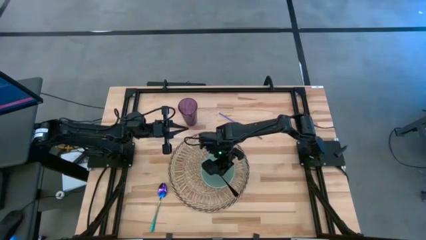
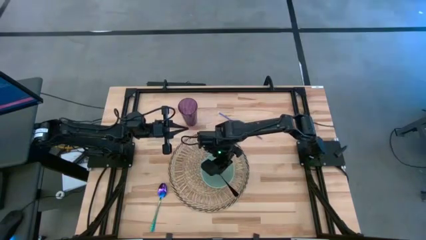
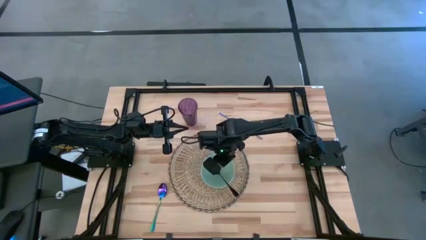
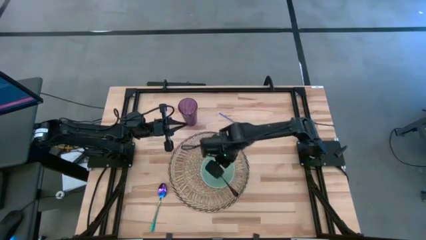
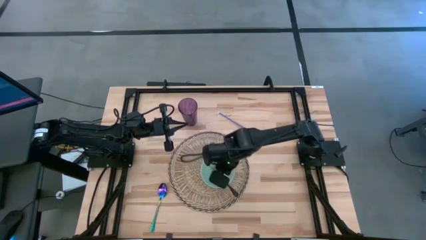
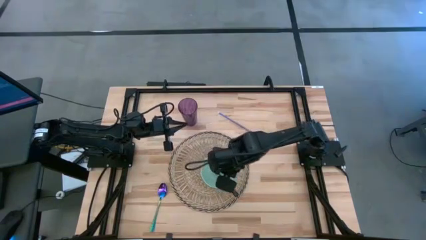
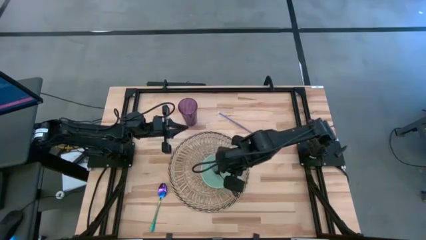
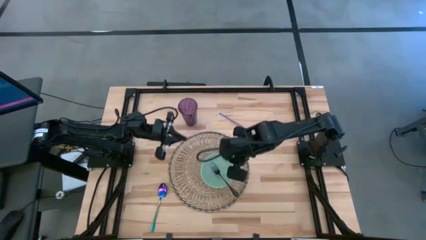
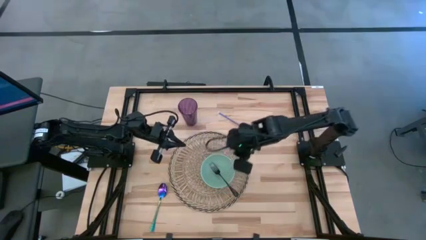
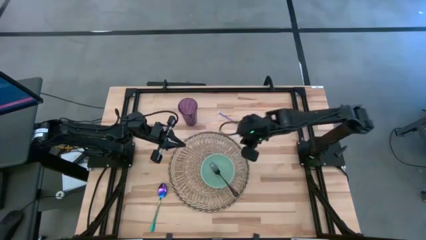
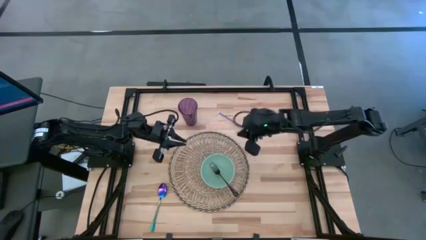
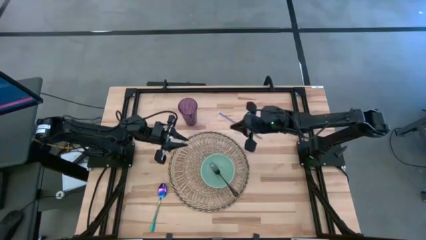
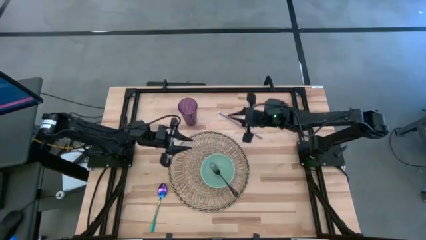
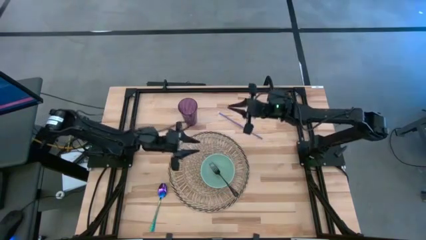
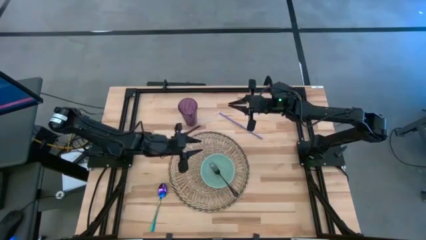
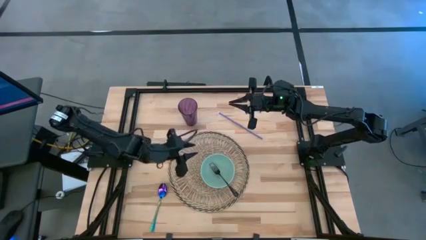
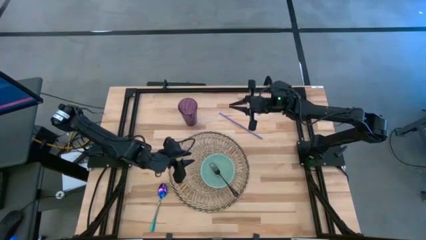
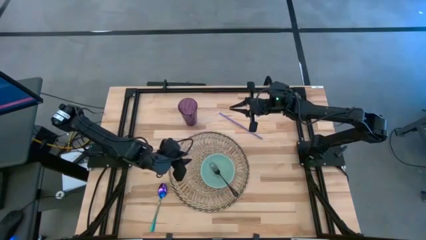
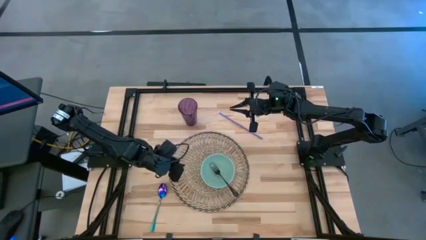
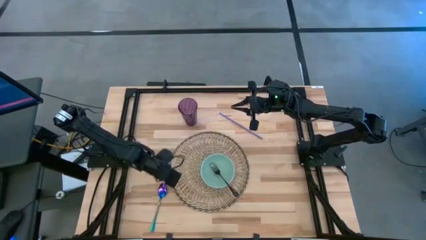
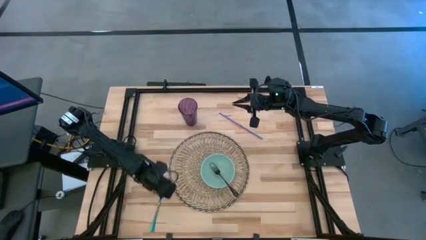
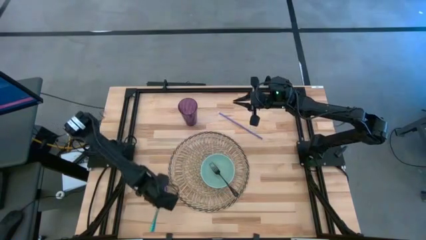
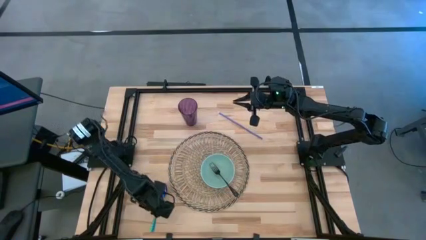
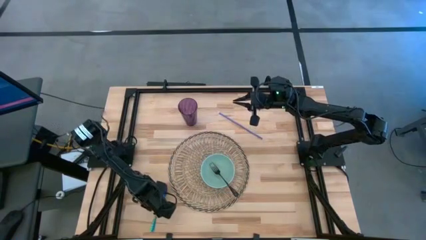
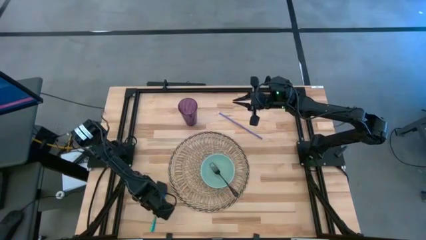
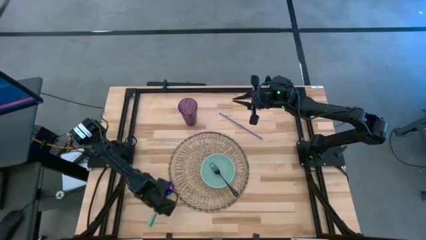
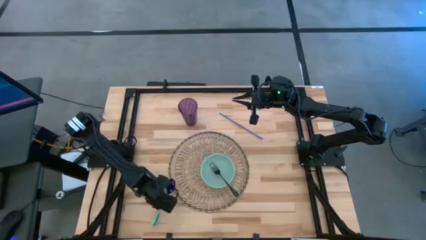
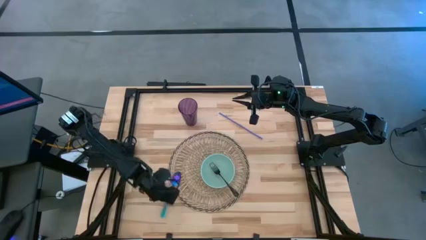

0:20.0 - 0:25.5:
Task: Pick & Place Utensil
Put the blue spoon into the light blue bowl on the table placemat

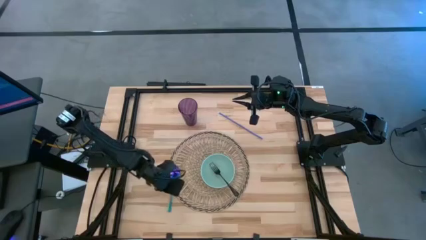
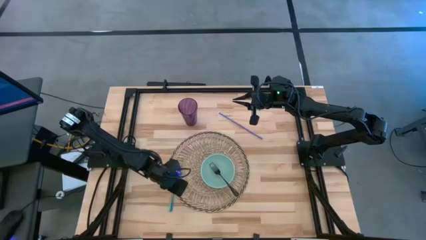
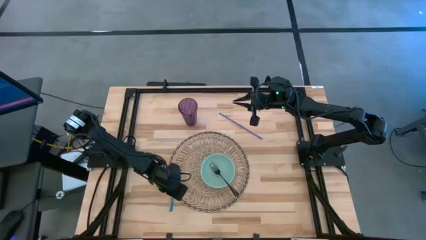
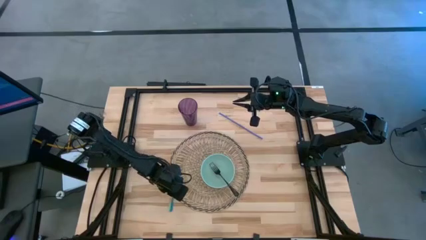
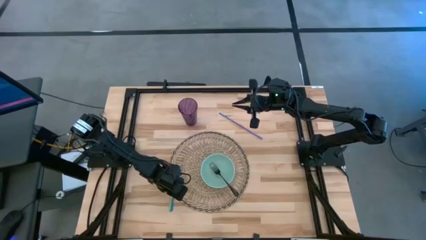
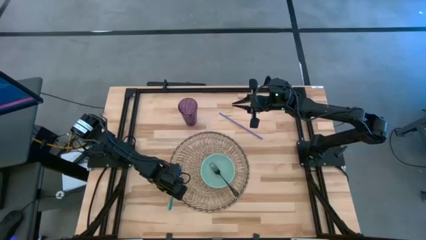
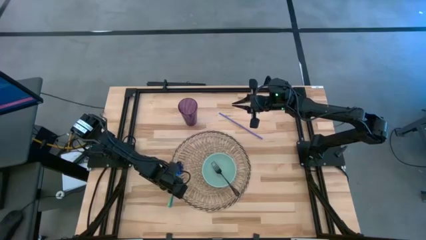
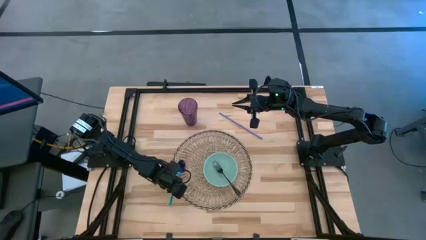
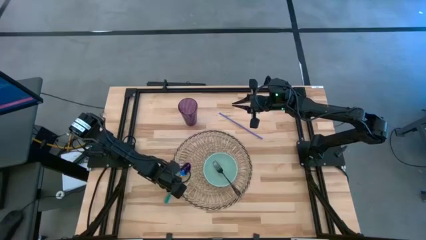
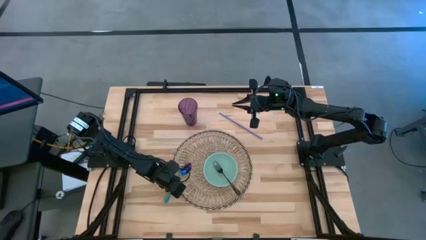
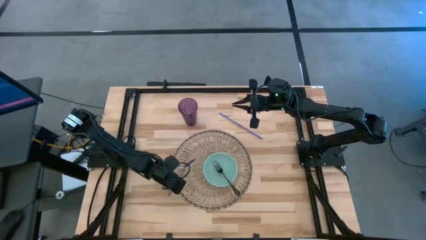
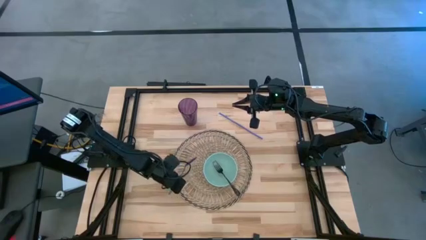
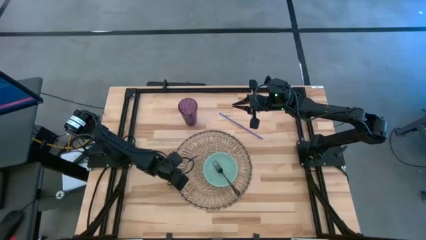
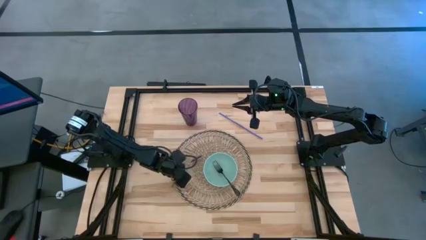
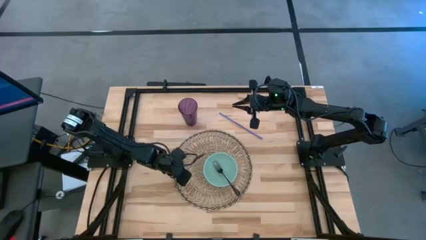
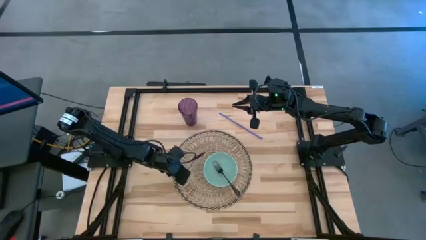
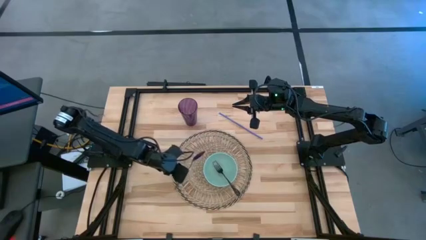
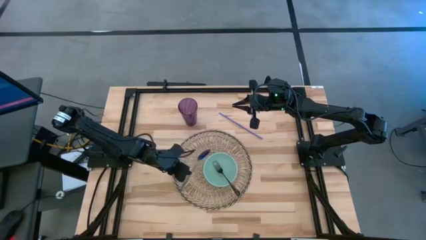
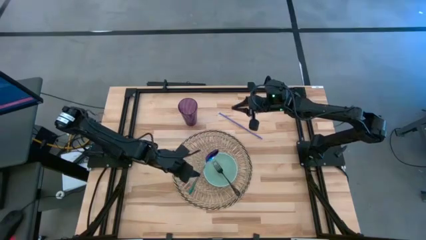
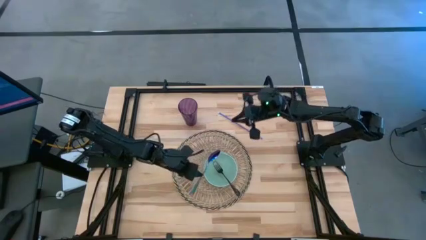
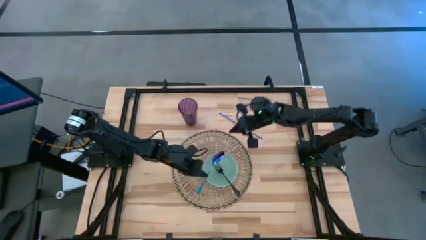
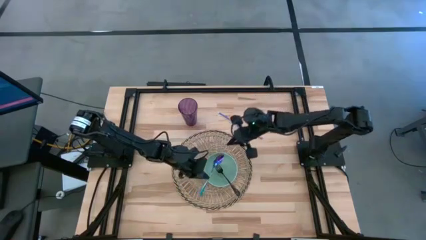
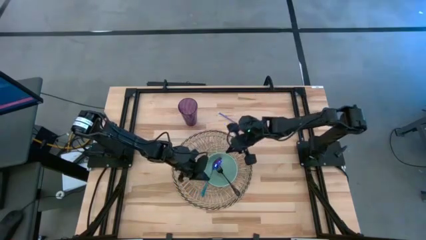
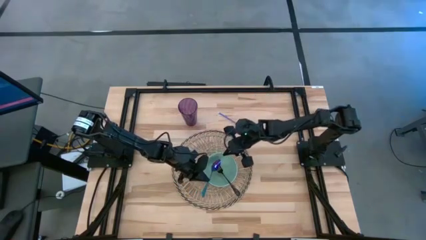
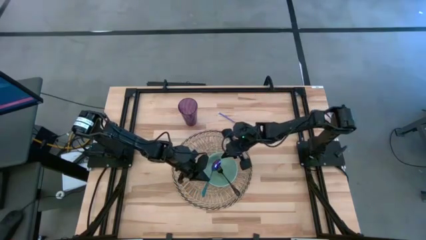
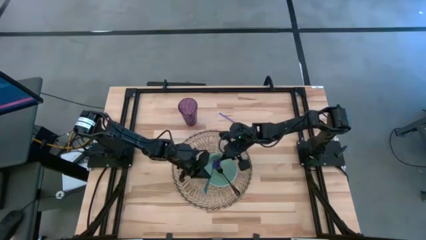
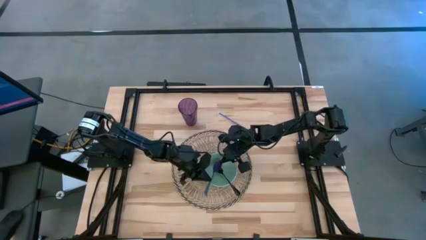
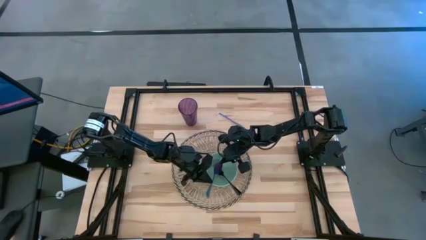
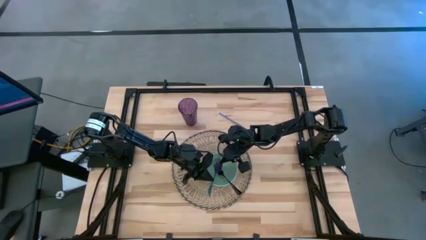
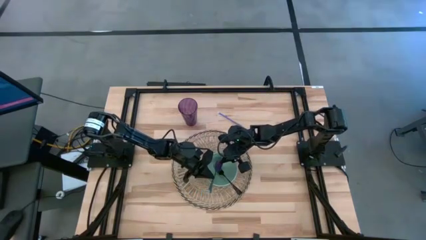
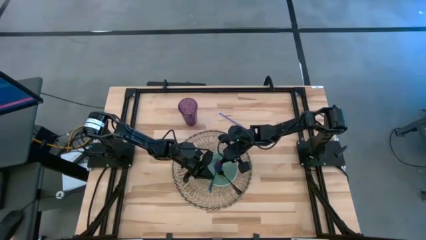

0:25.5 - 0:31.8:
Put the blue spoon into the light blue bowl on the table placemat

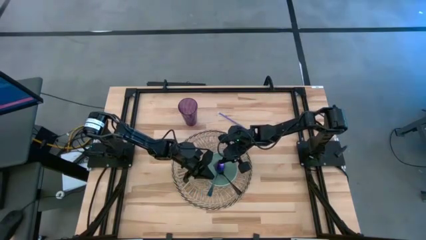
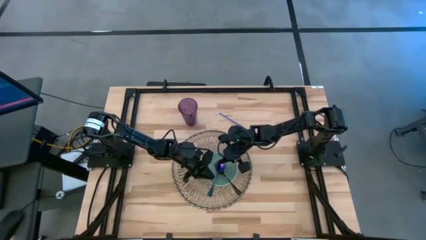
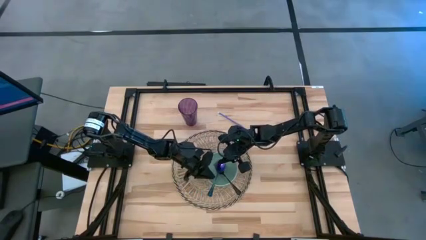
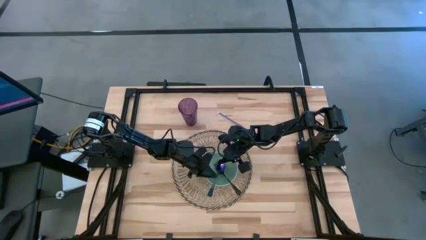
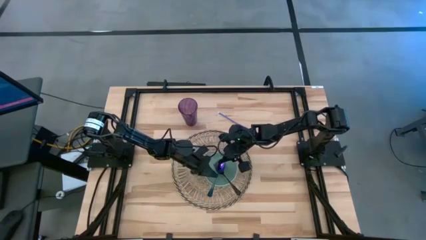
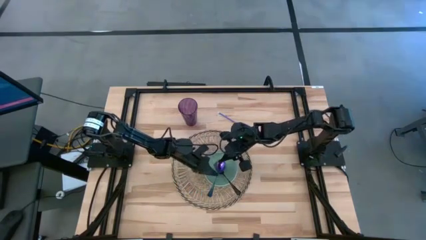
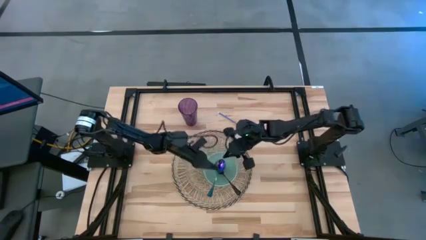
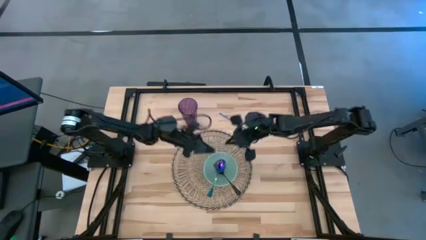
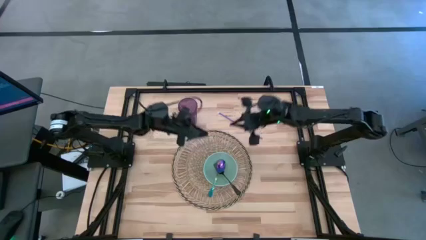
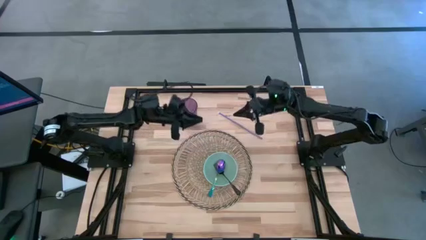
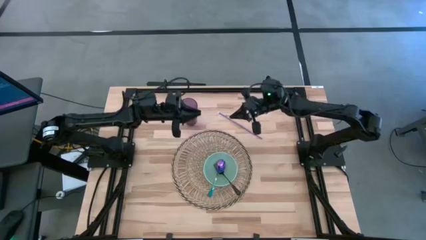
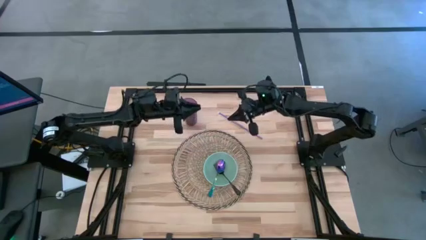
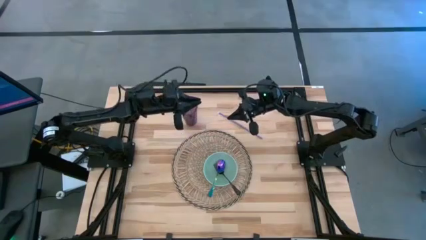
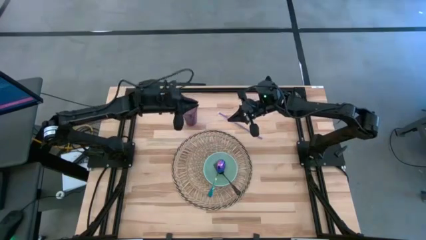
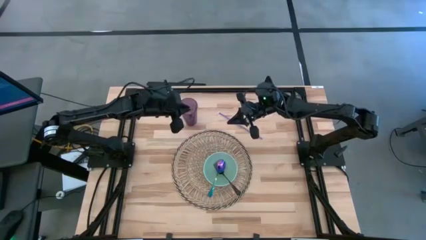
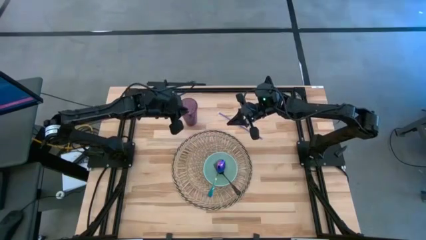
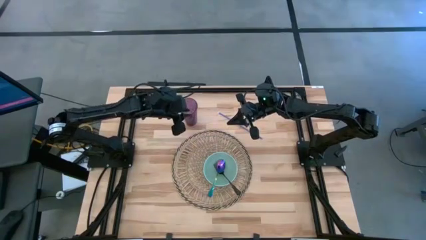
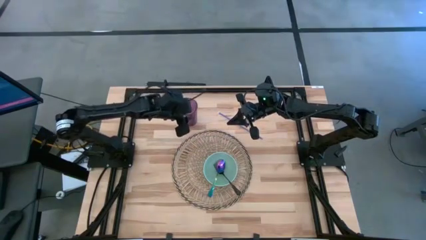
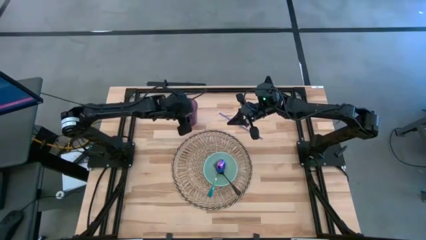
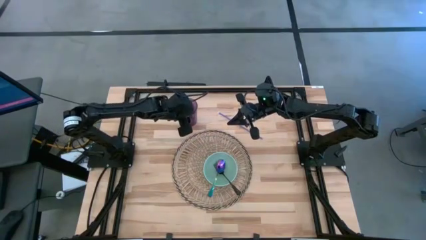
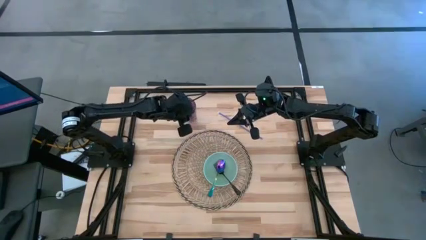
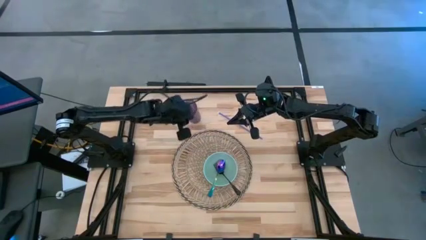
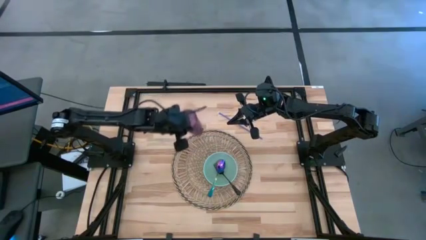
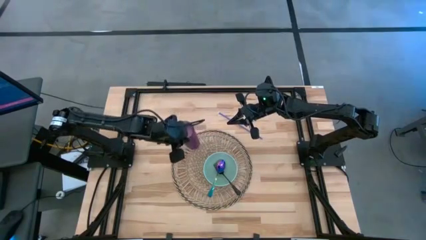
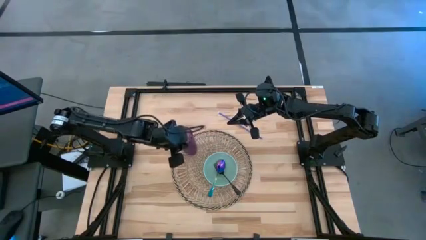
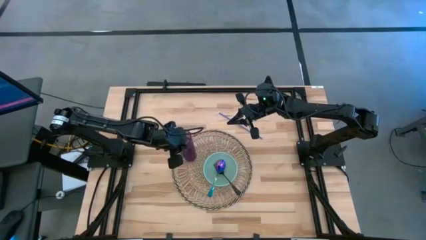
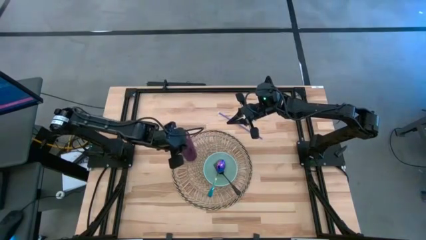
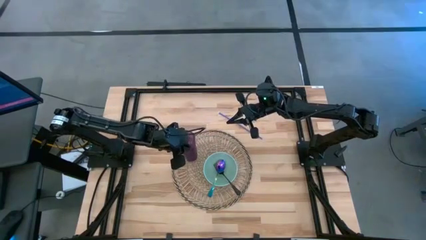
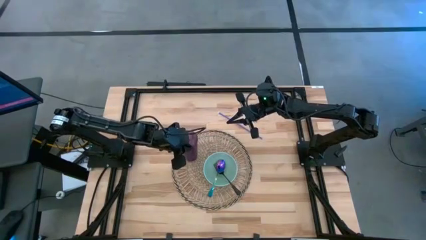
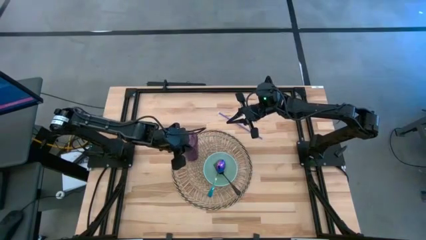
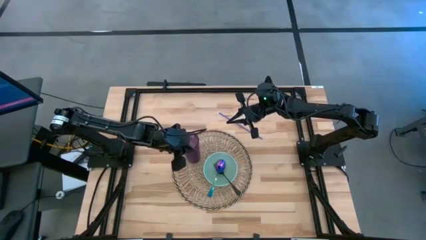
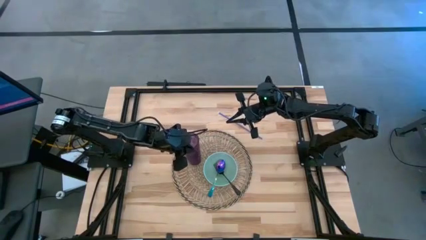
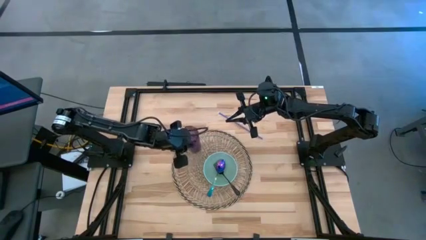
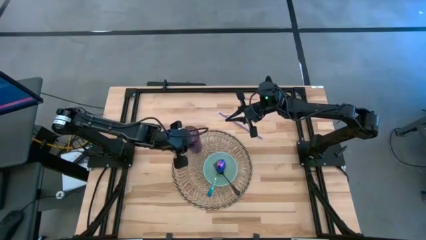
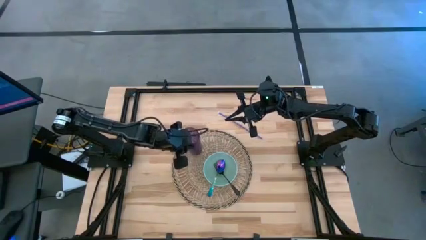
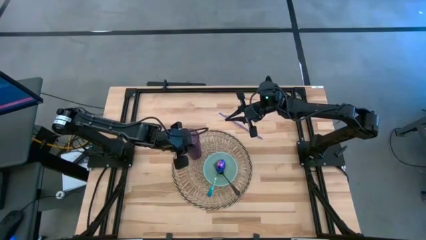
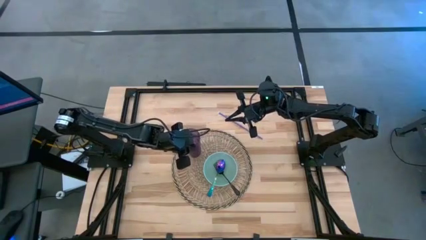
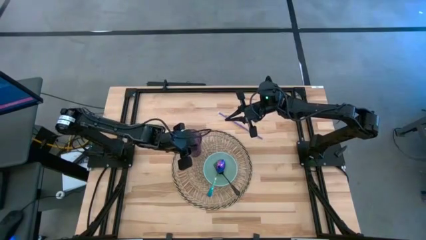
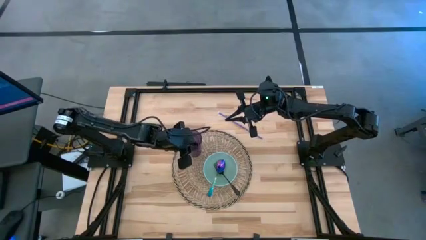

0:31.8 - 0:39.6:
Put the purple cup to the left side of the bowl on the table placemat
